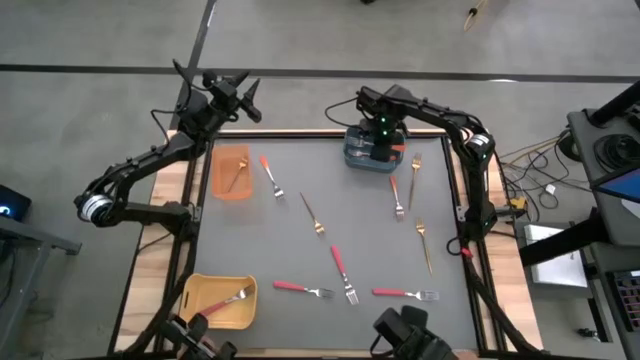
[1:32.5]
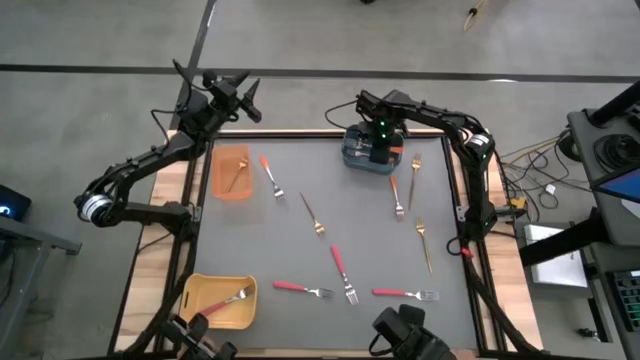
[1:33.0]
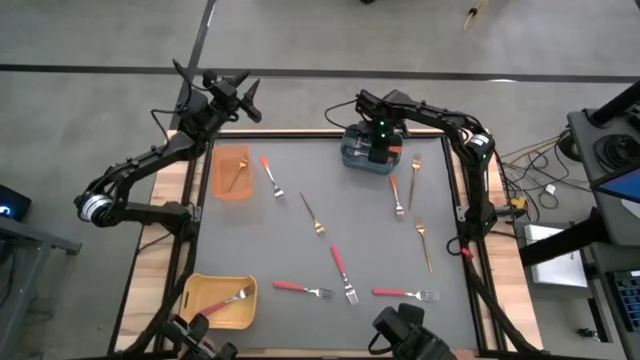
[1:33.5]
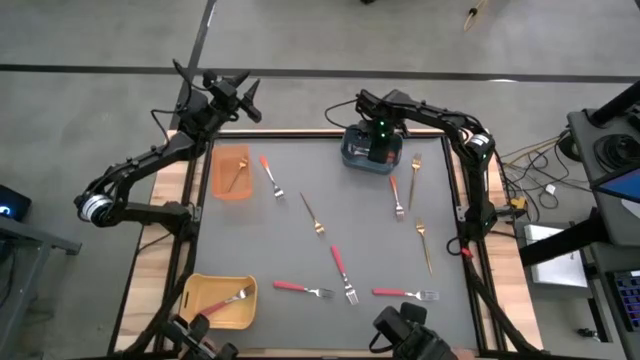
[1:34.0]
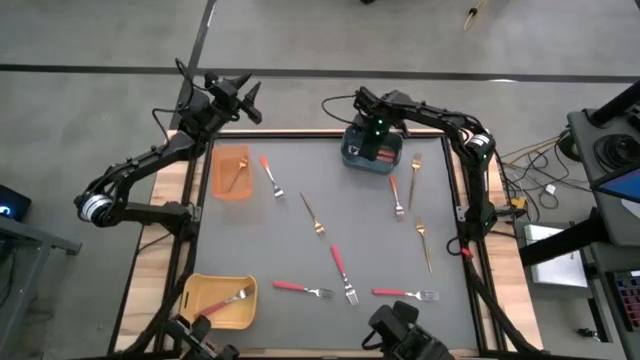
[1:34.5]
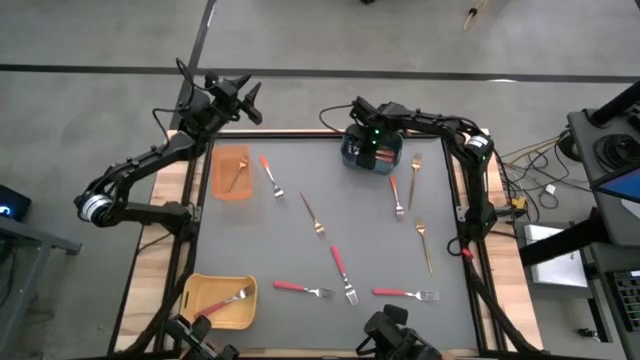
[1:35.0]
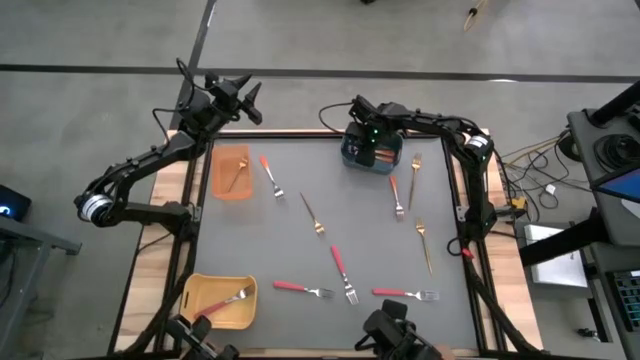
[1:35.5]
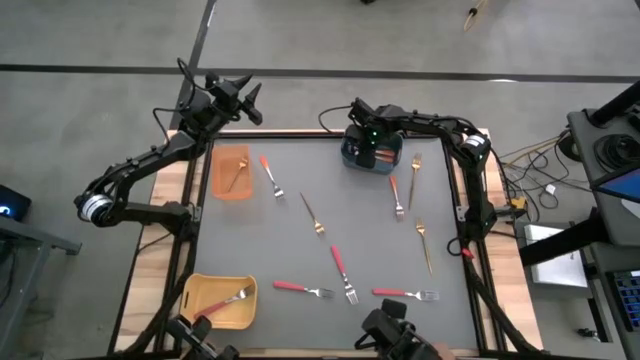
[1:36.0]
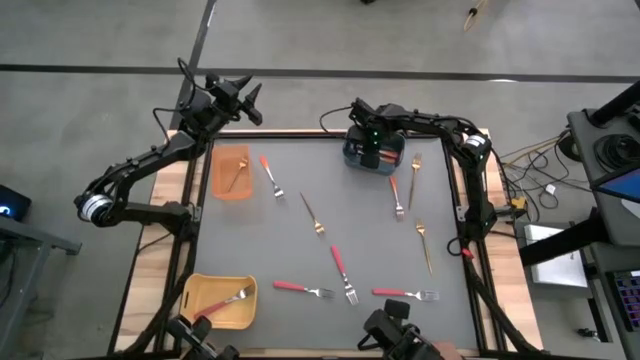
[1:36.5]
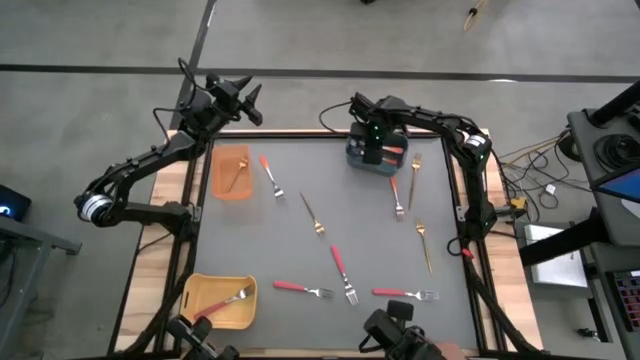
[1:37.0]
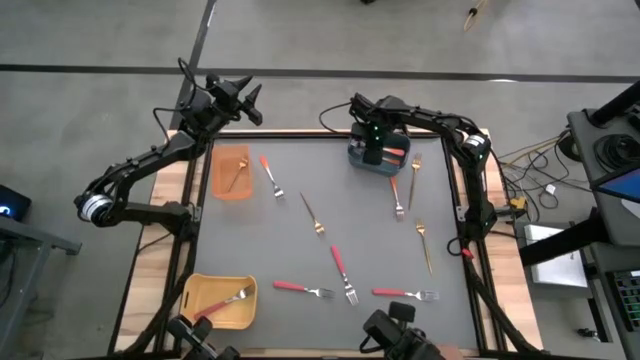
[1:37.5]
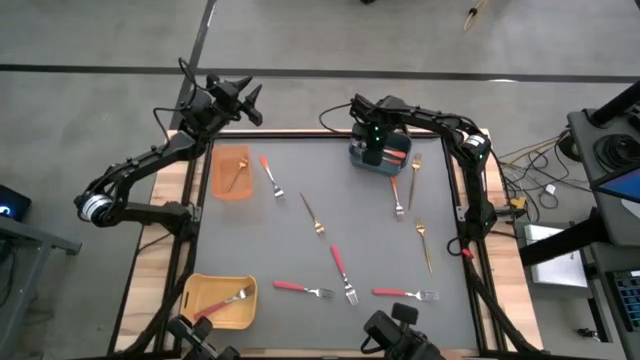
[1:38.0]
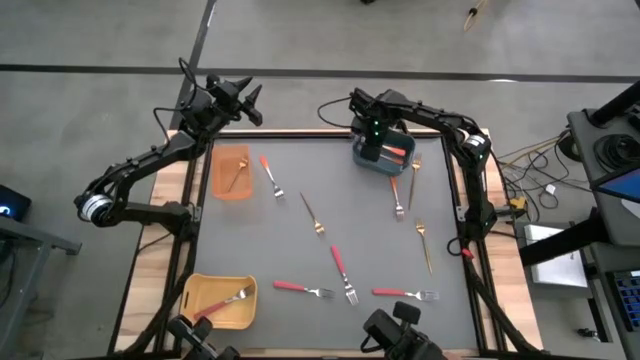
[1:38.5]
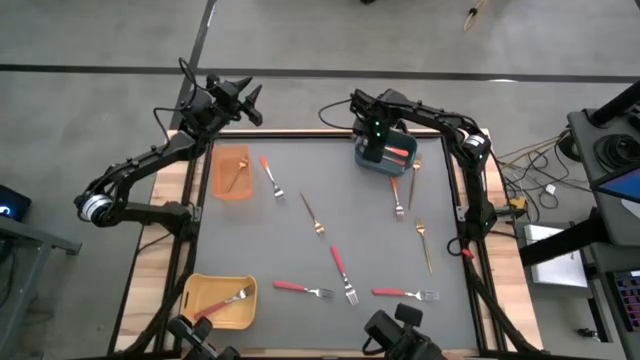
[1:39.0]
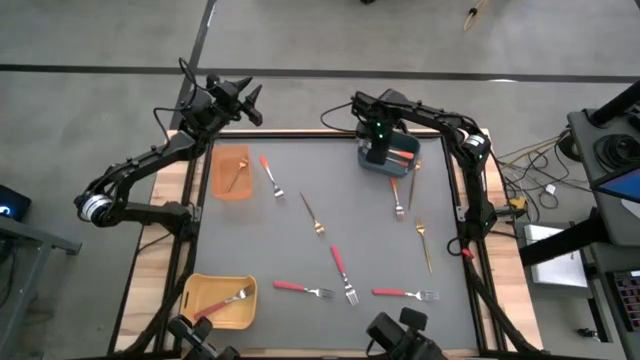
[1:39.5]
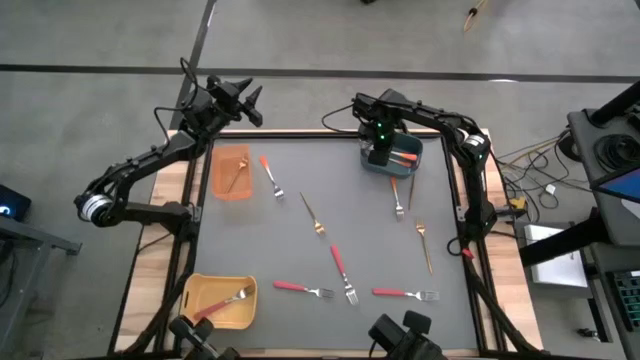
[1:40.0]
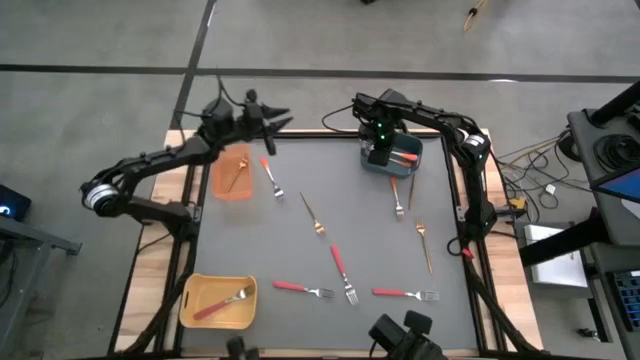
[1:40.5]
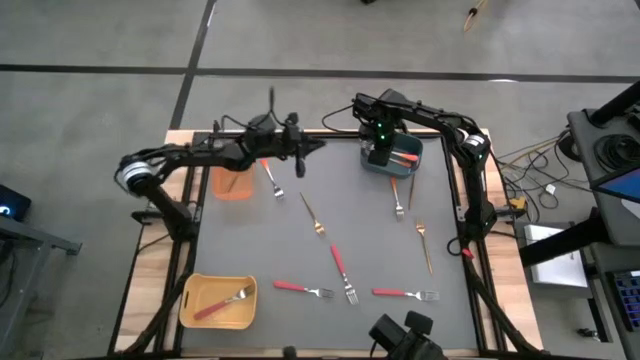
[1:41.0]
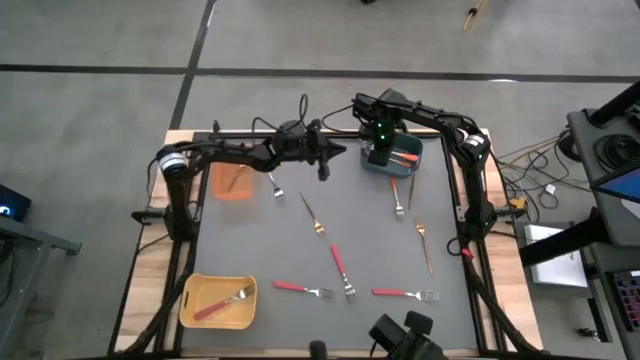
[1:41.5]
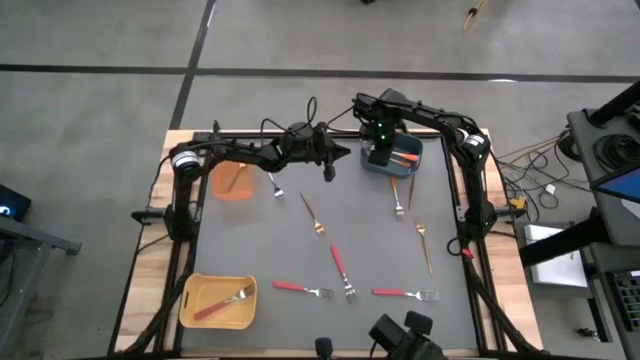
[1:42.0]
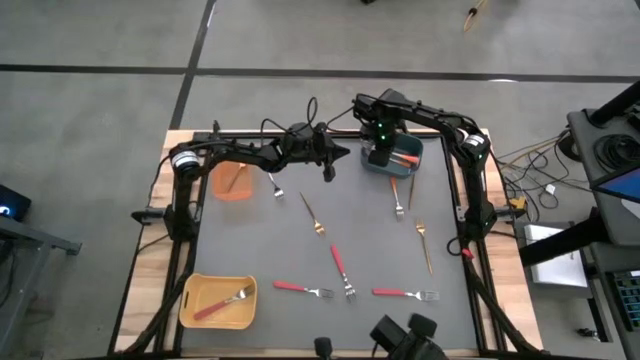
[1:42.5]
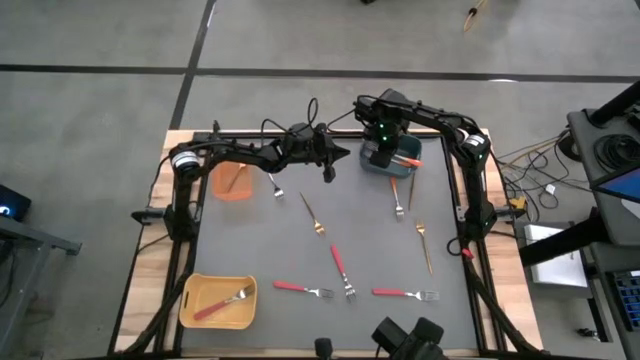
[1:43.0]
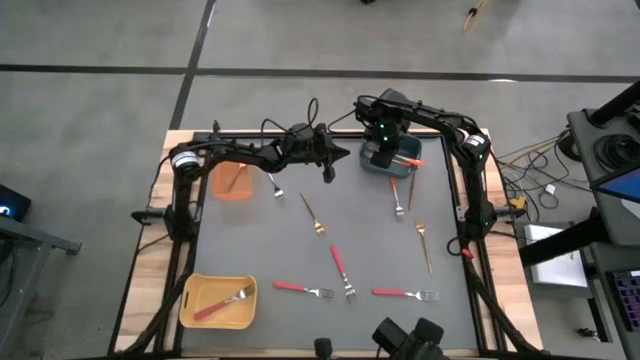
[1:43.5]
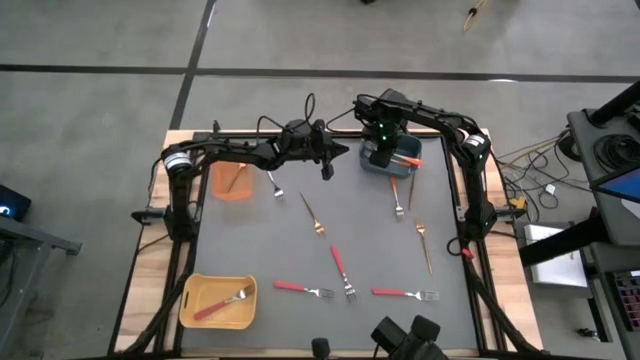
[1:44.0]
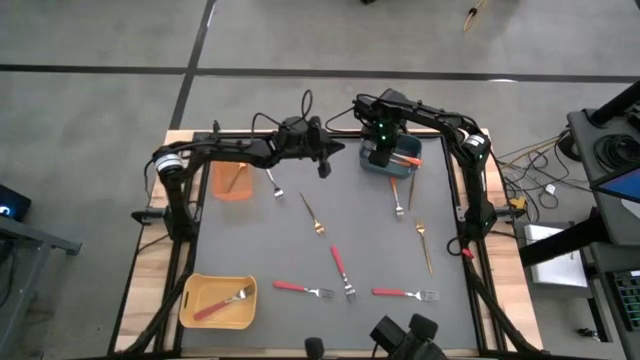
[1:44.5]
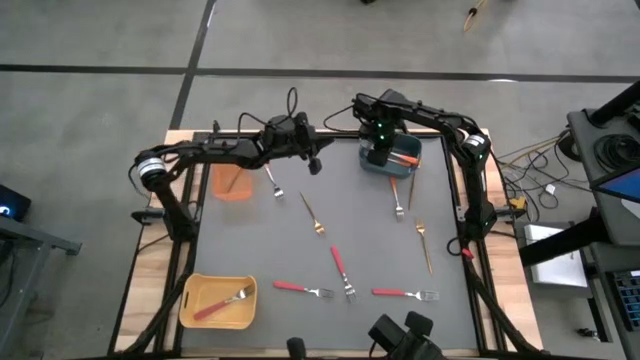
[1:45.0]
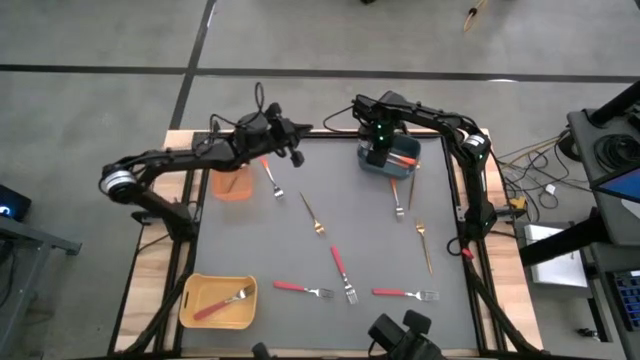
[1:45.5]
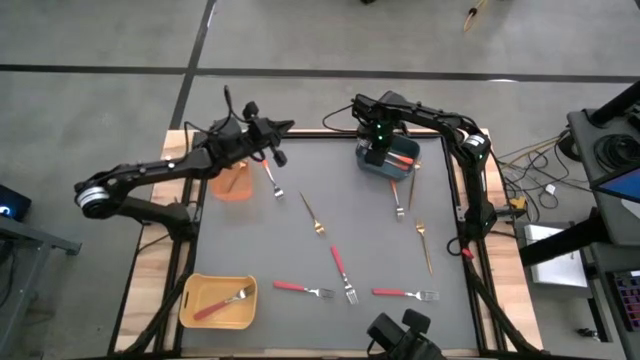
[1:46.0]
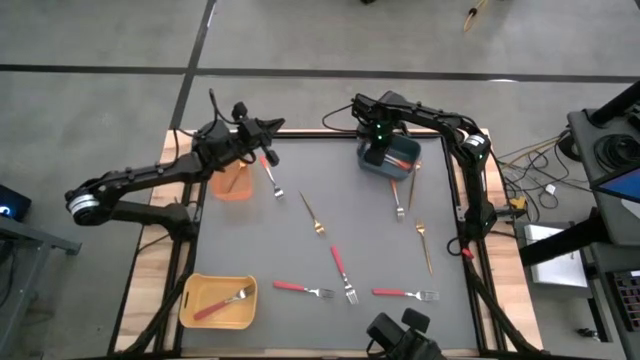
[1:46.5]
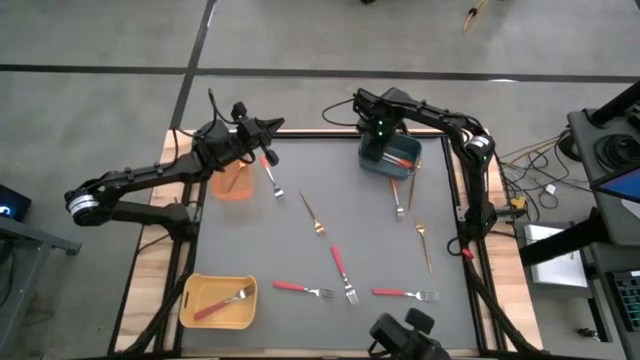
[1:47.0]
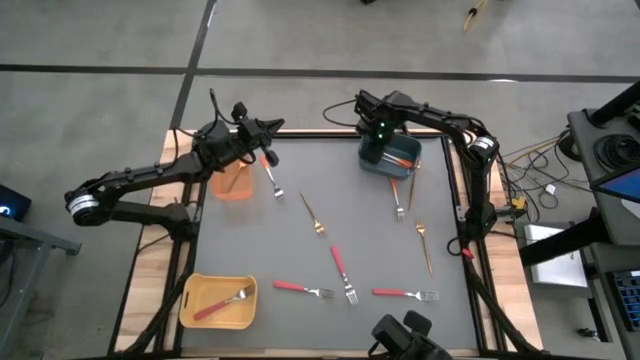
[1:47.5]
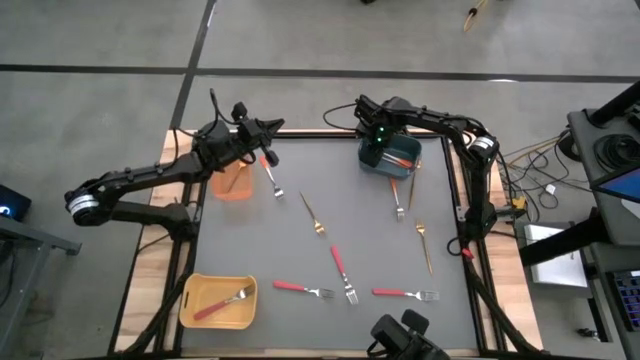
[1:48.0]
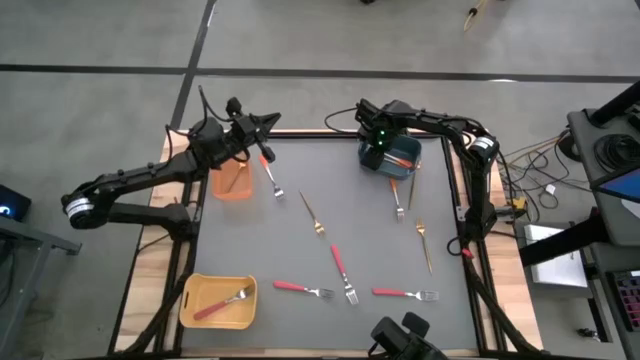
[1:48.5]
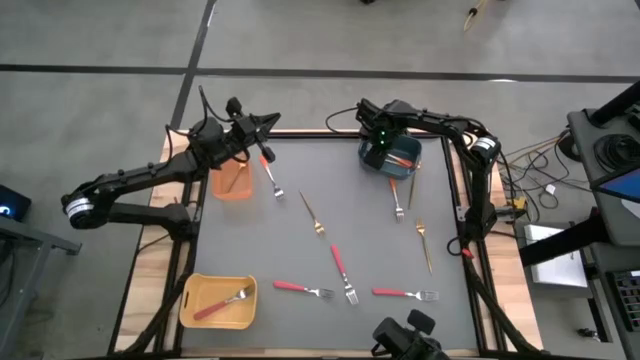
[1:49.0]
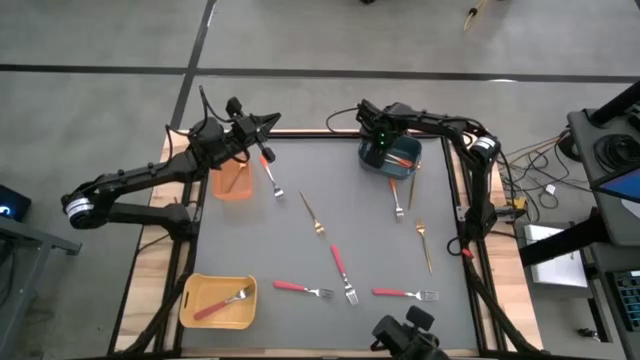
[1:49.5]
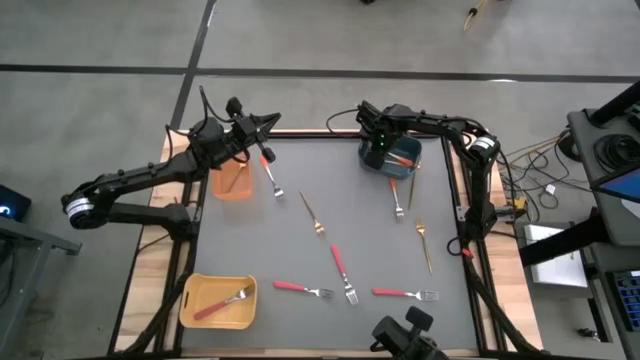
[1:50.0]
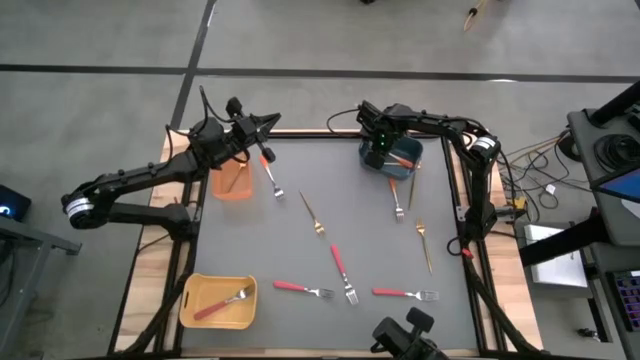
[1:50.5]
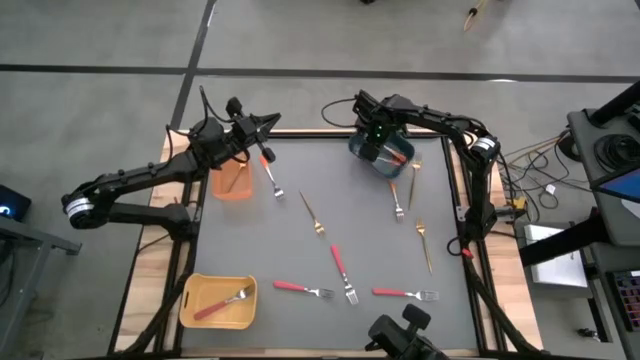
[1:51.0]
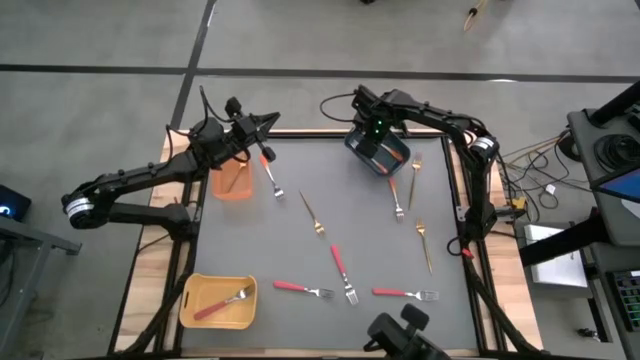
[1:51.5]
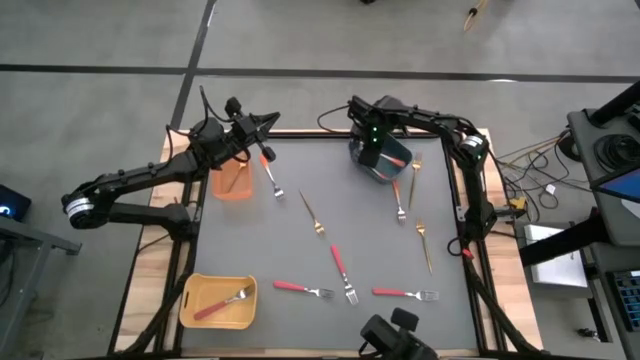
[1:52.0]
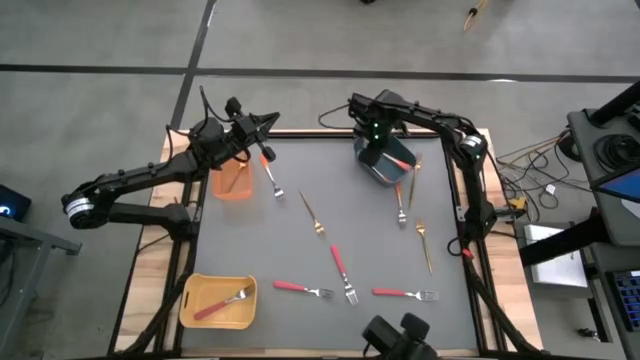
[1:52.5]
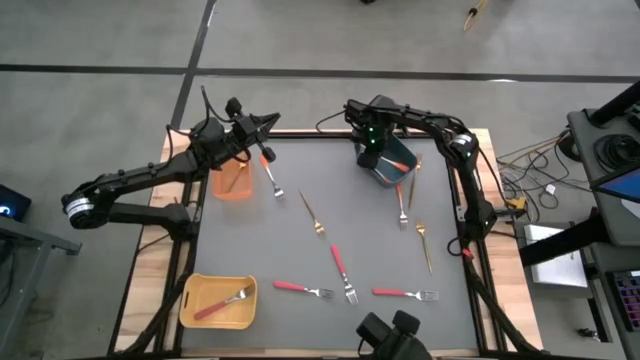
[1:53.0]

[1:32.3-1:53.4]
Task: Sort silverware by color (type)
Put the orange fork into the blue bin

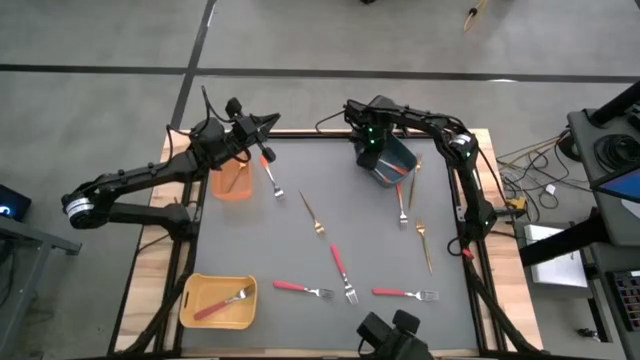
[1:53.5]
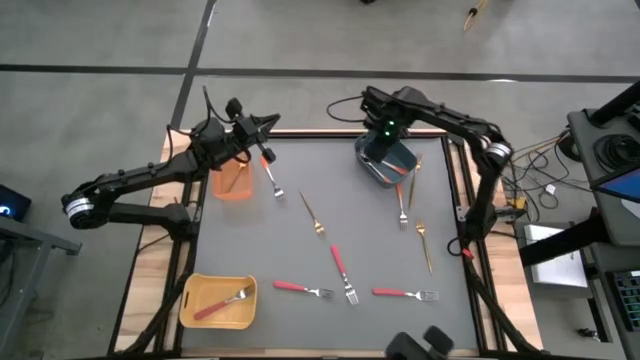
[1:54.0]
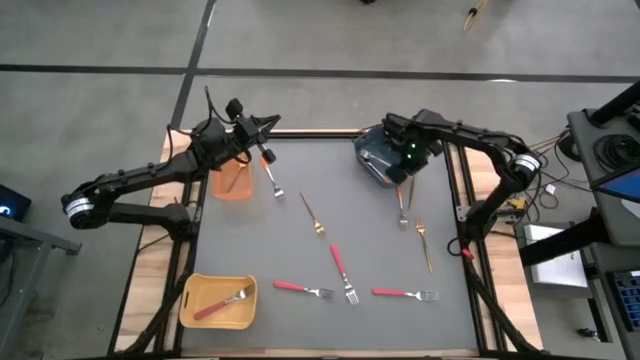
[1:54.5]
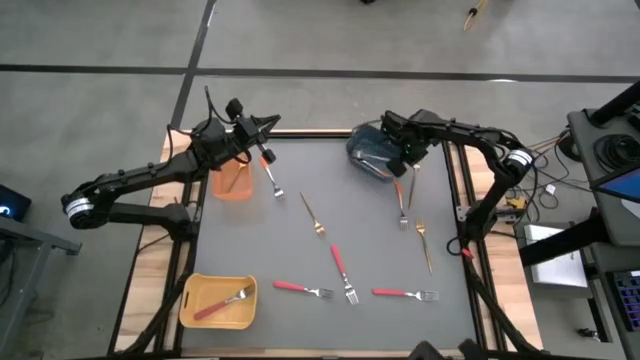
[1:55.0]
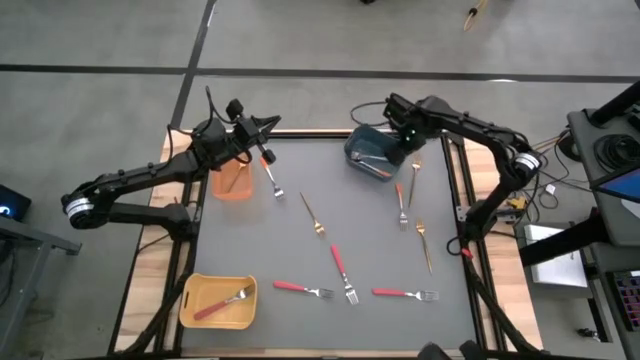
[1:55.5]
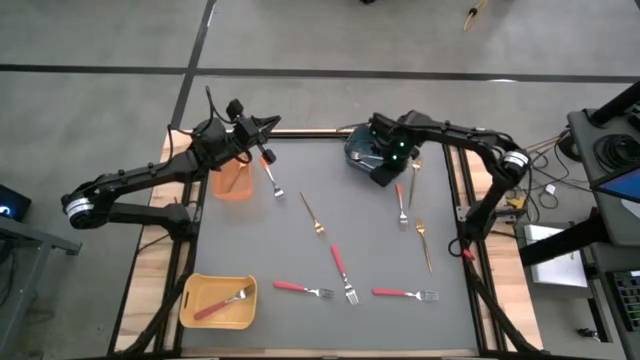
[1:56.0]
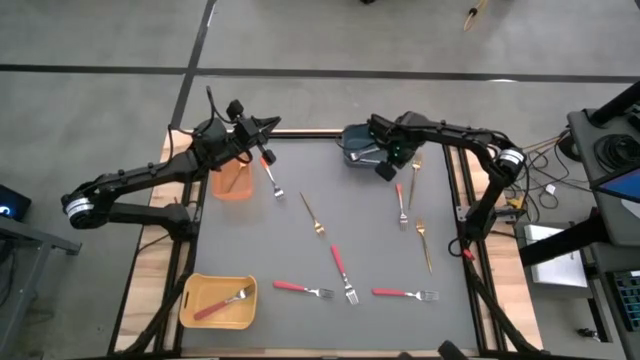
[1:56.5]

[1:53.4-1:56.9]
Adjust the blue bin
